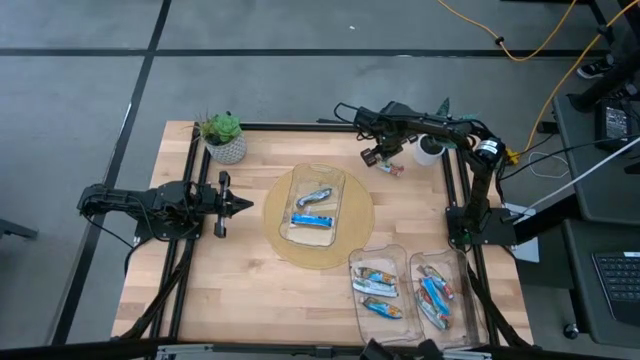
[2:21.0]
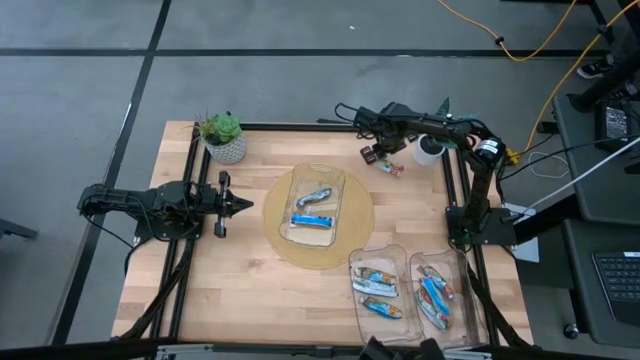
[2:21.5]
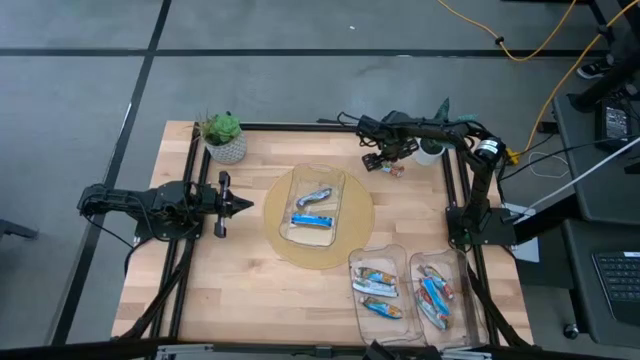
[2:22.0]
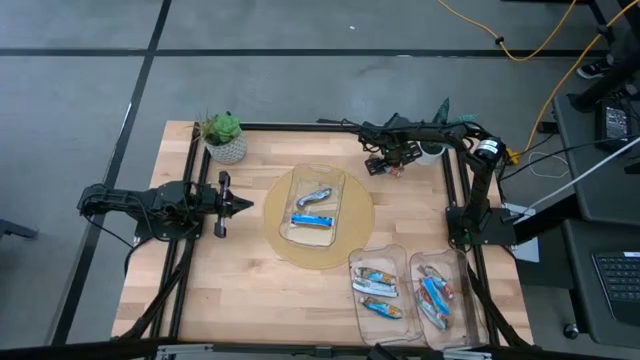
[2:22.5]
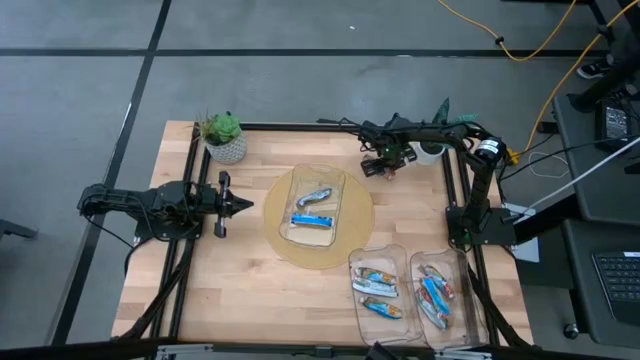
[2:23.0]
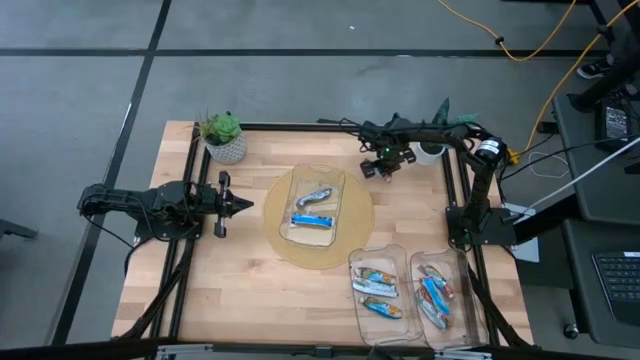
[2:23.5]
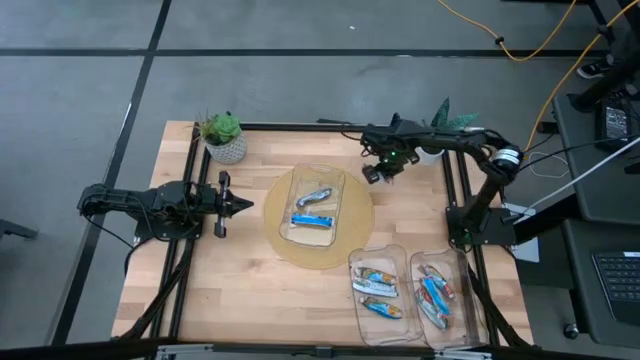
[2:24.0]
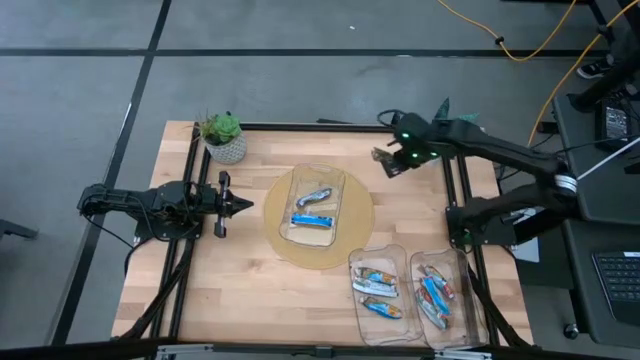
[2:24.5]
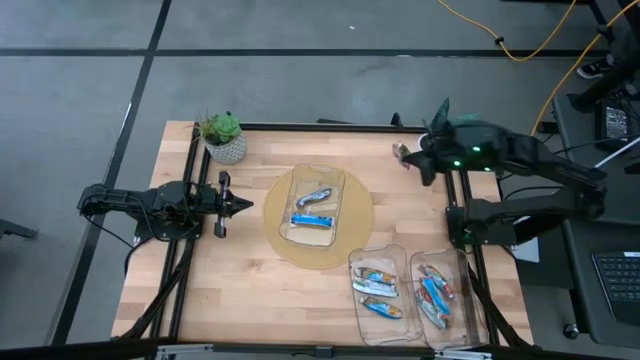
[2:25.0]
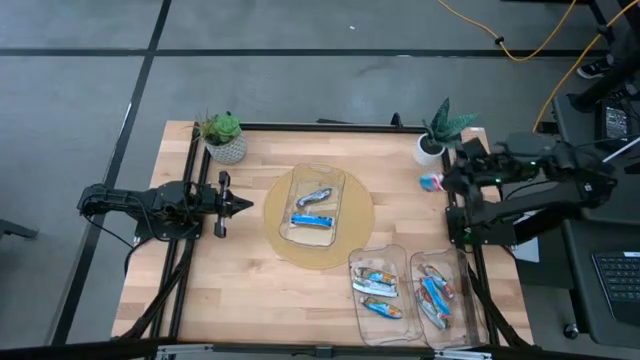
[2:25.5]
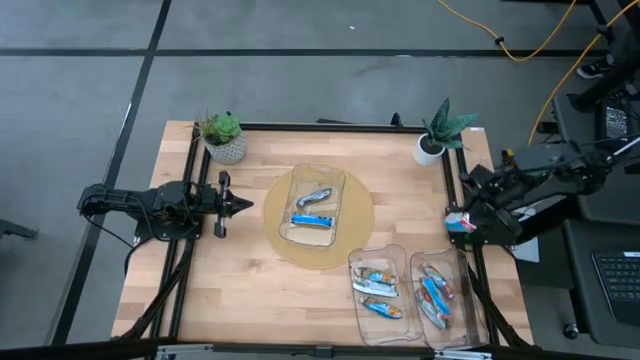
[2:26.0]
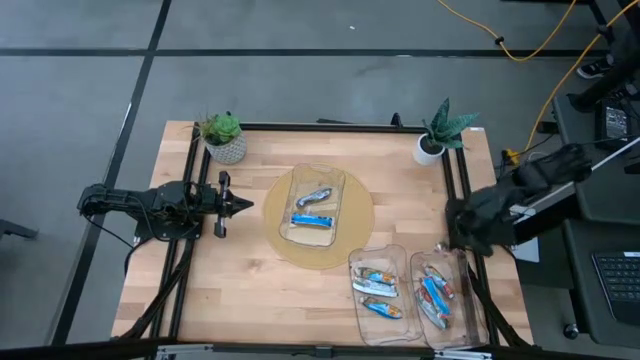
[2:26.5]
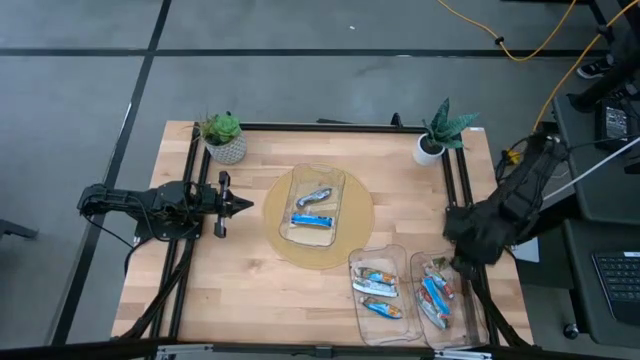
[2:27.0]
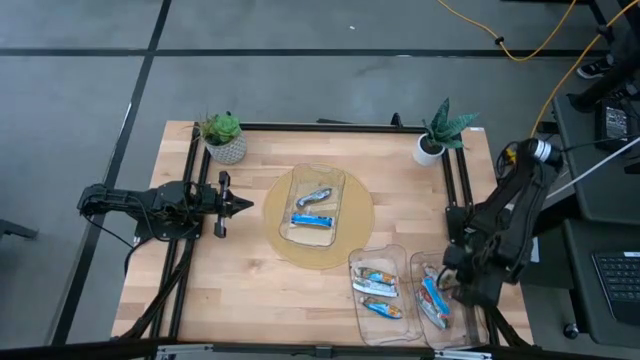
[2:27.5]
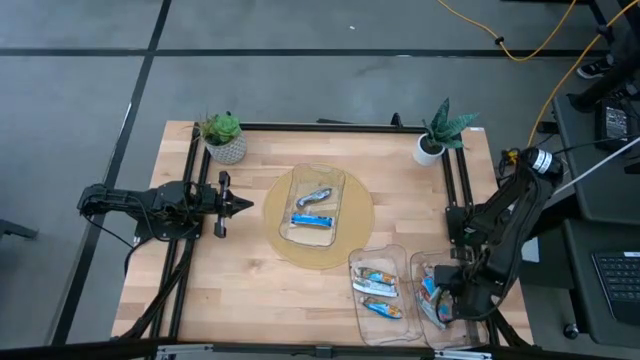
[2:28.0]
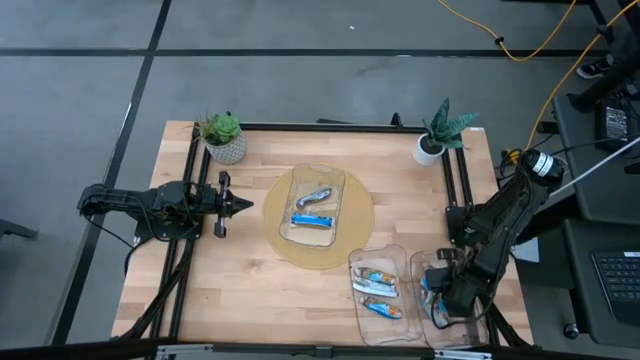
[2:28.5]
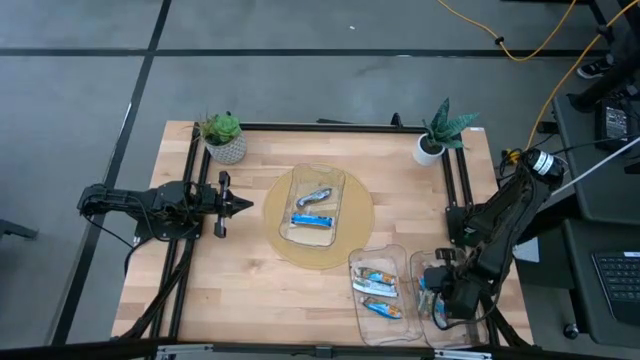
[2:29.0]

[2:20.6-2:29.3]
Task: Pick and place Granola Bars by type
Put the red granola bar pack into the bottom right transparent bin

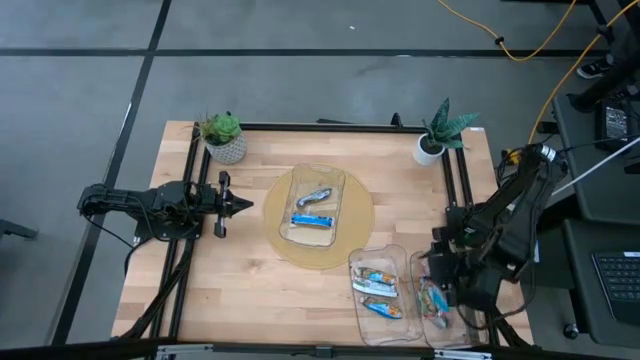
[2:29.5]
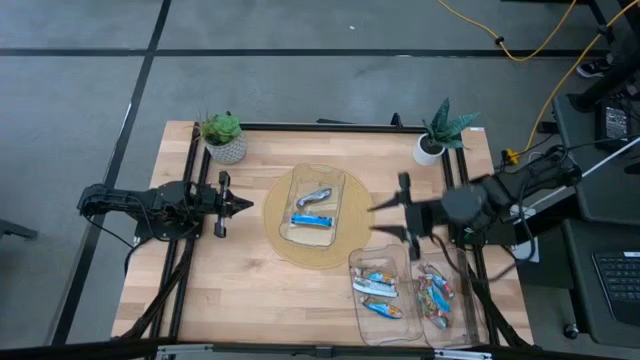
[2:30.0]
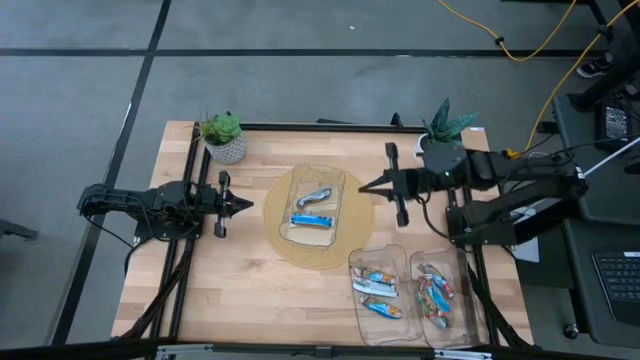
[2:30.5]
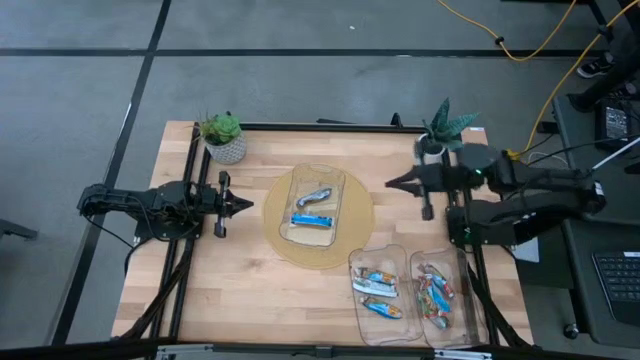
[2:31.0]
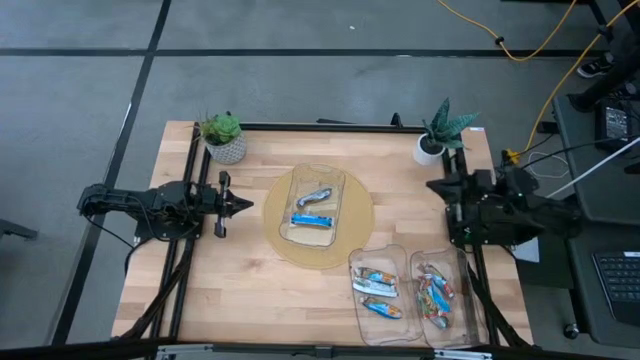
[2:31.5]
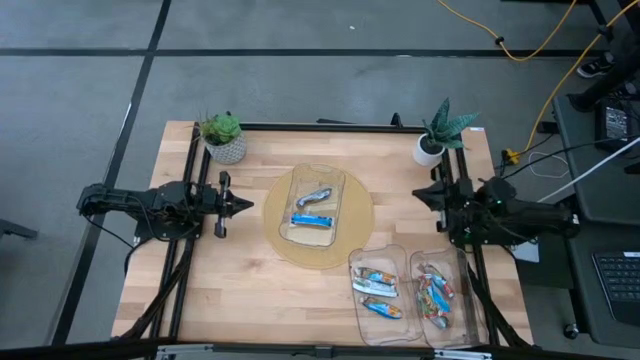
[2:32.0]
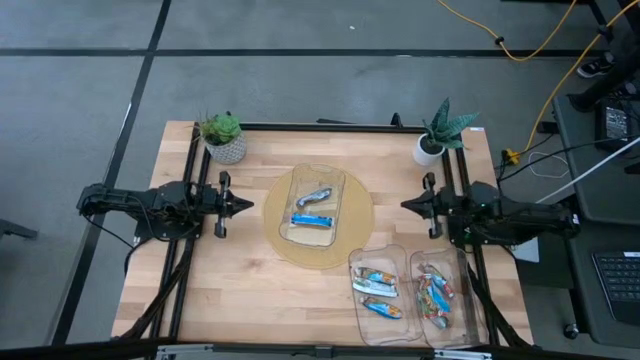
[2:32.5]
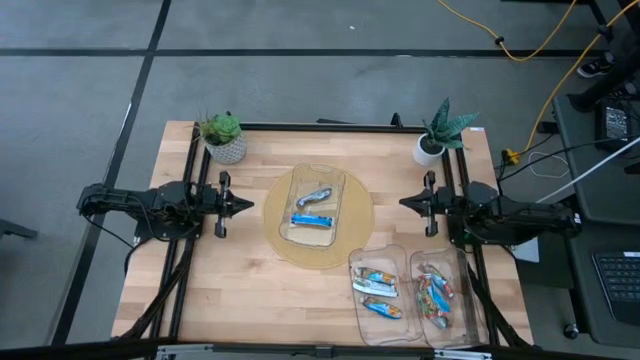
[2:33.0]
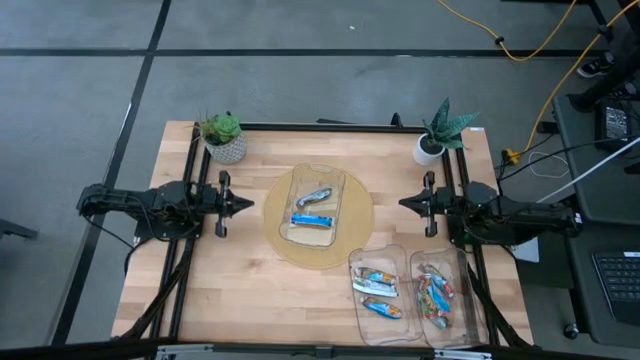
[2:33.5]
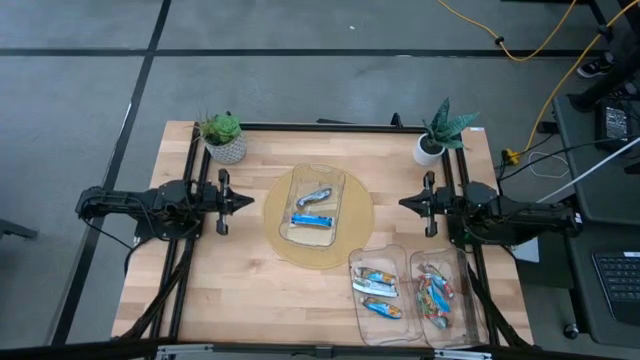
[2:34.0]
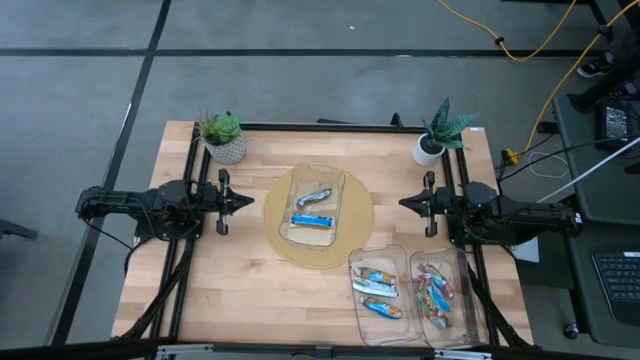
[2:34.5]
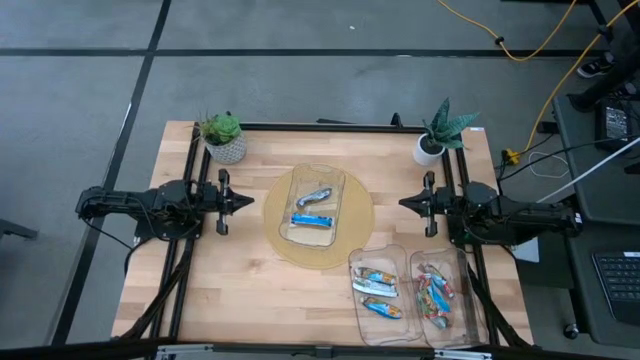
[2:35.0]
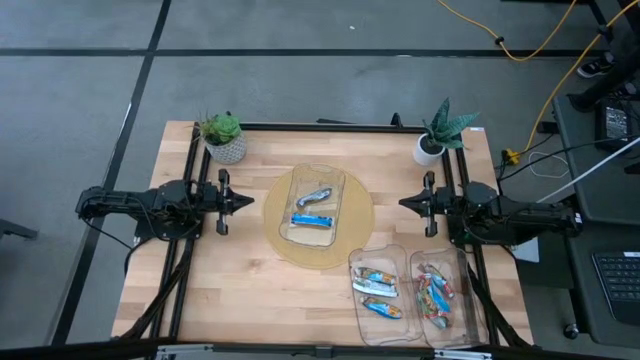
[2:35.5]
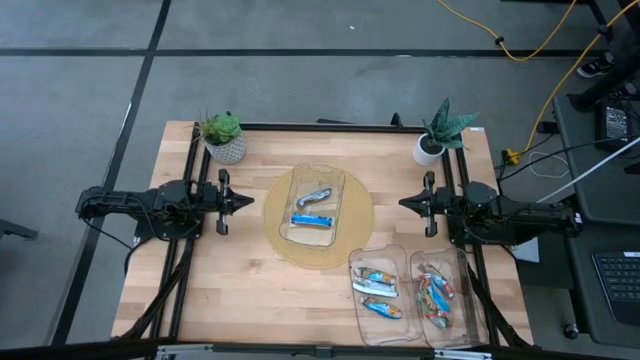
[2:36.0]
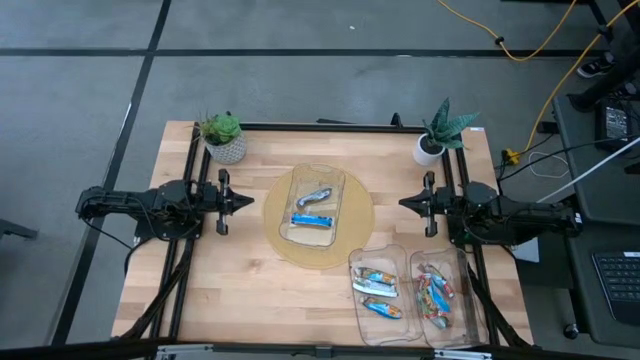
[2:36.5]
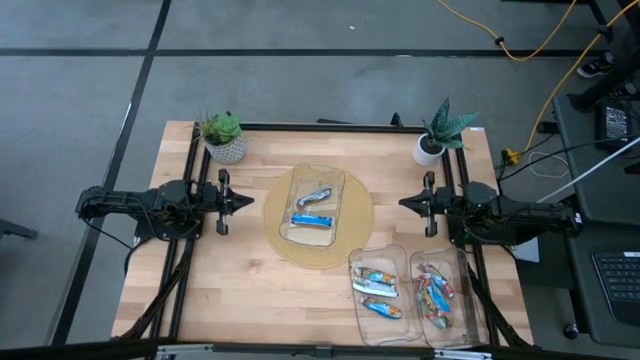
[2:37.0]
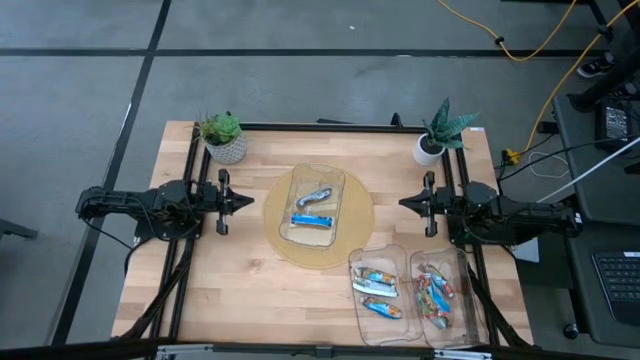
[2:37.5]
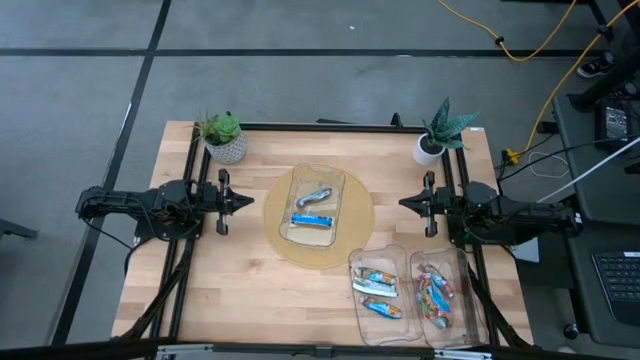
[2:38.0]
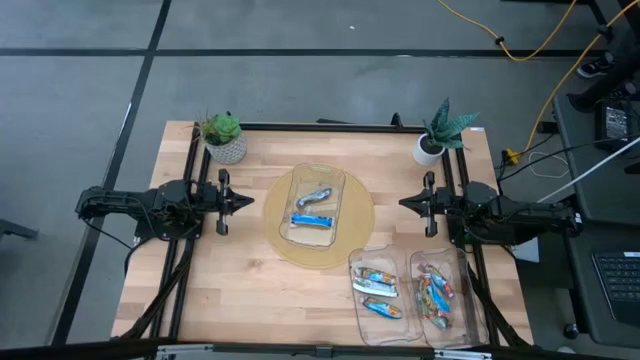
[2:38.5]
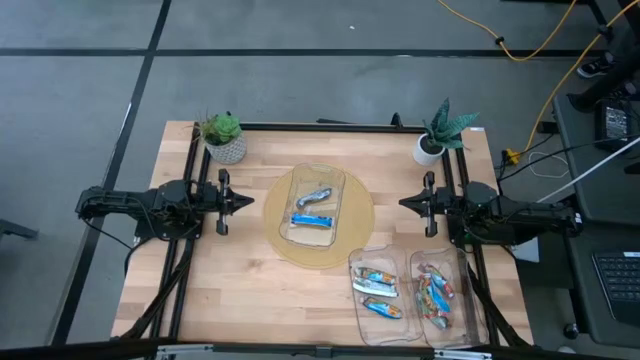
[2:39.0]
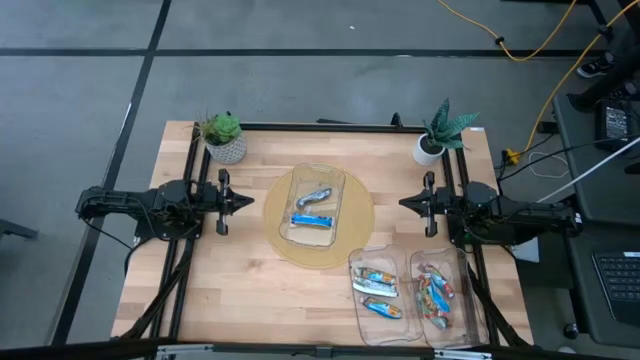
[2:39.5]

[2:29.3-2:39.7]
Return to Home Position
